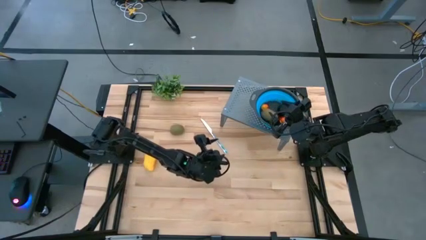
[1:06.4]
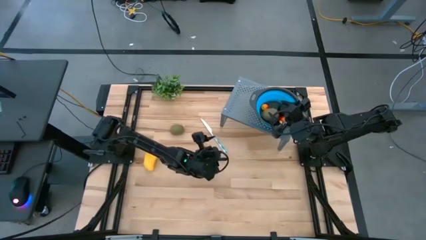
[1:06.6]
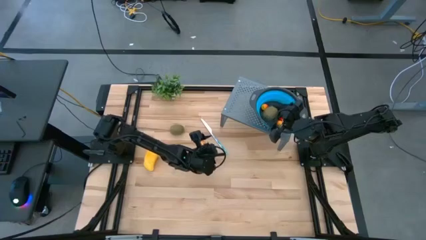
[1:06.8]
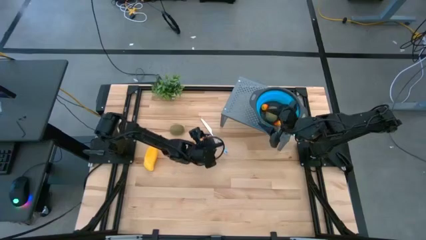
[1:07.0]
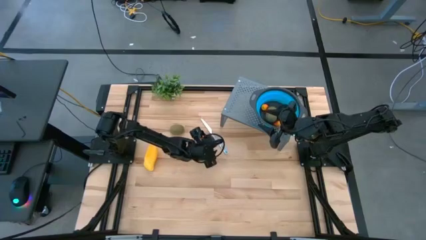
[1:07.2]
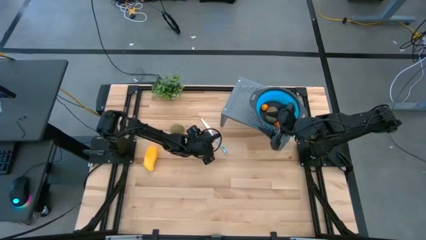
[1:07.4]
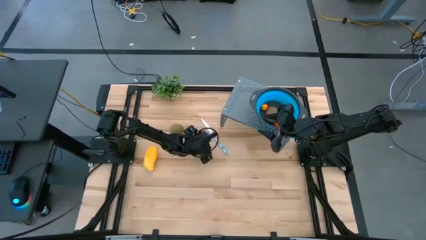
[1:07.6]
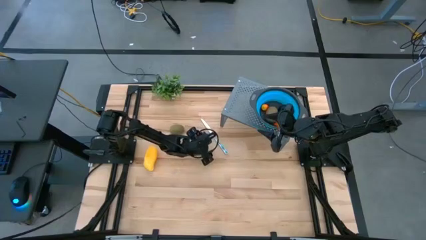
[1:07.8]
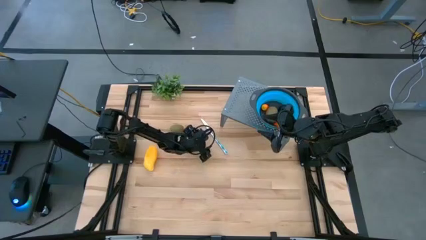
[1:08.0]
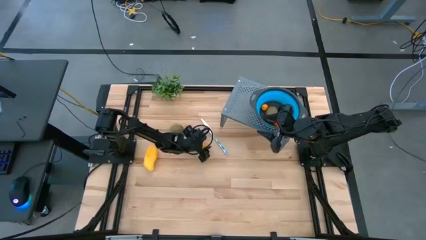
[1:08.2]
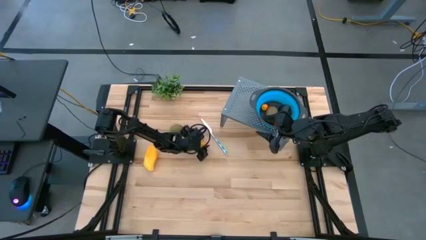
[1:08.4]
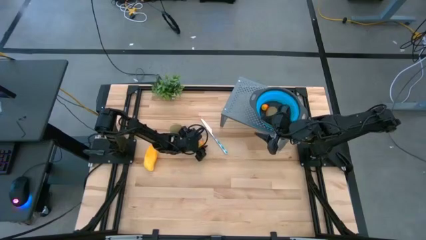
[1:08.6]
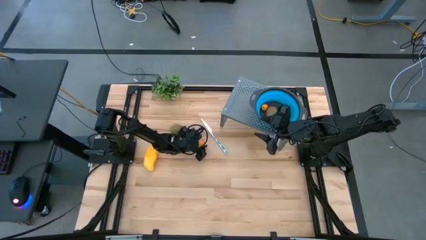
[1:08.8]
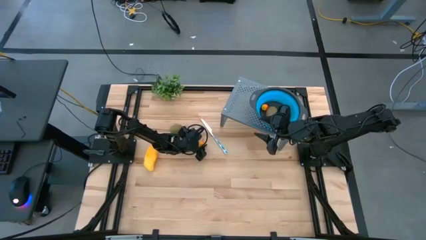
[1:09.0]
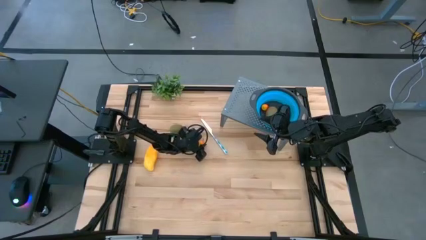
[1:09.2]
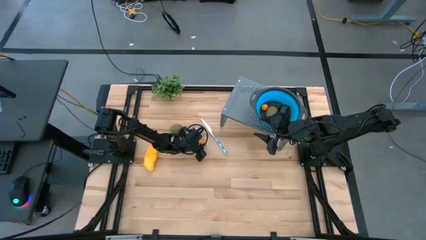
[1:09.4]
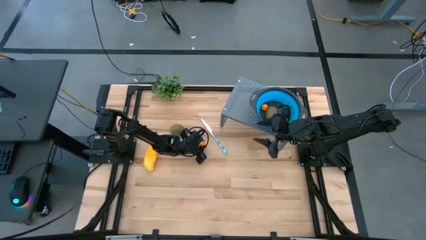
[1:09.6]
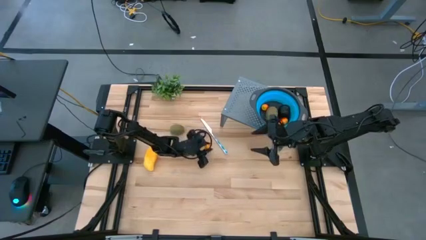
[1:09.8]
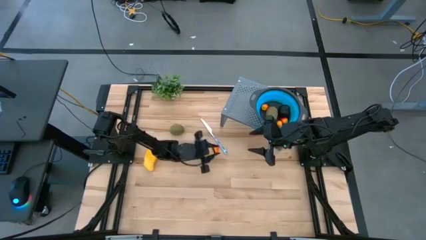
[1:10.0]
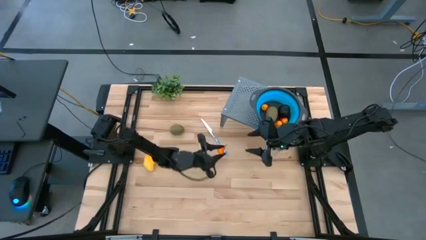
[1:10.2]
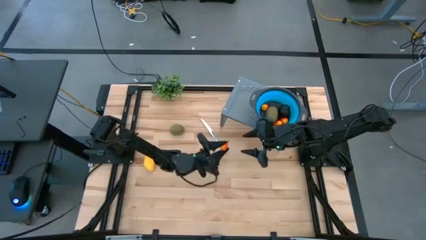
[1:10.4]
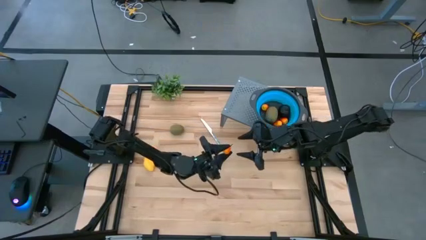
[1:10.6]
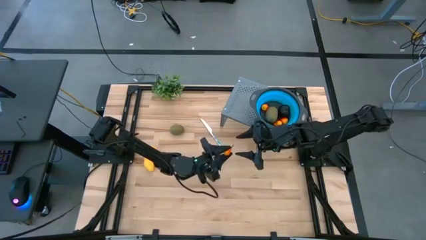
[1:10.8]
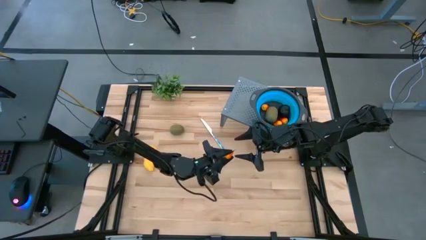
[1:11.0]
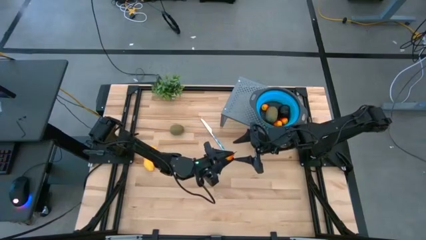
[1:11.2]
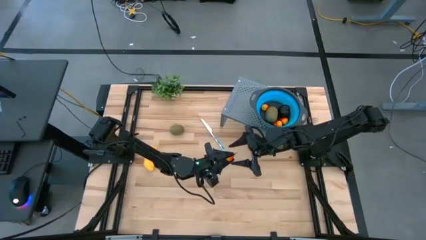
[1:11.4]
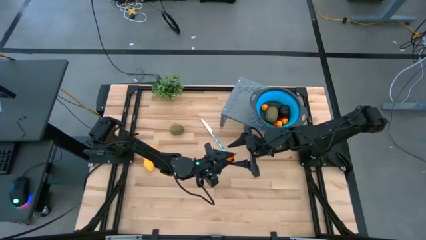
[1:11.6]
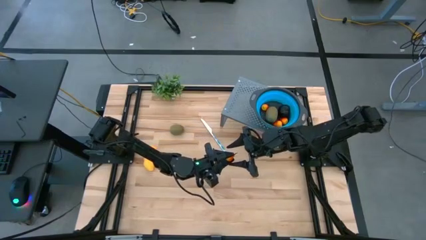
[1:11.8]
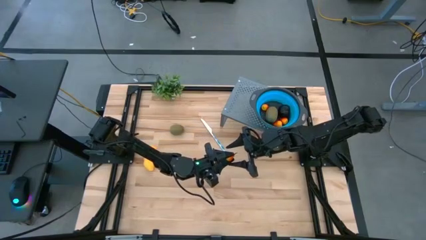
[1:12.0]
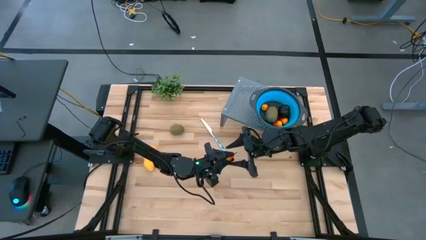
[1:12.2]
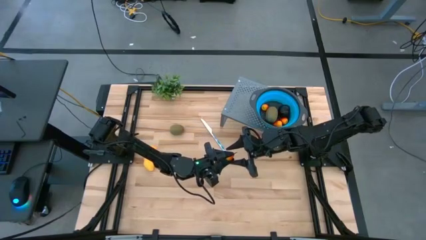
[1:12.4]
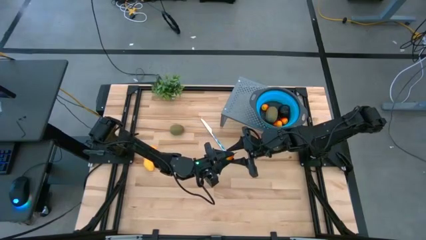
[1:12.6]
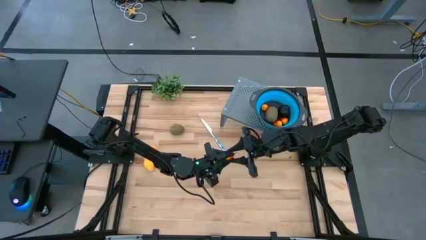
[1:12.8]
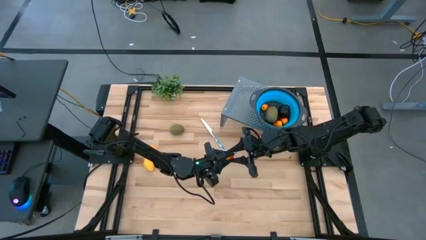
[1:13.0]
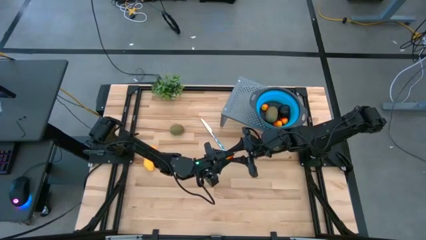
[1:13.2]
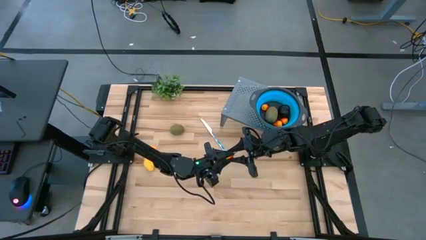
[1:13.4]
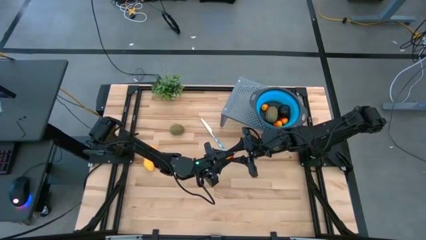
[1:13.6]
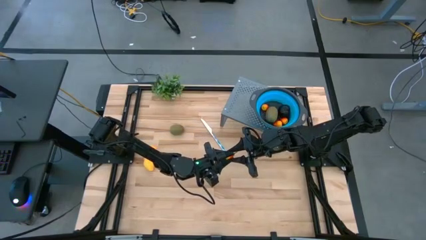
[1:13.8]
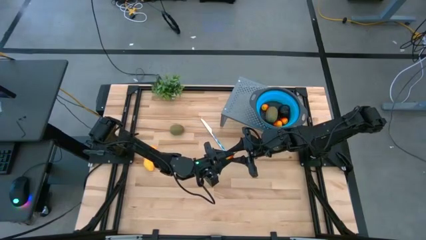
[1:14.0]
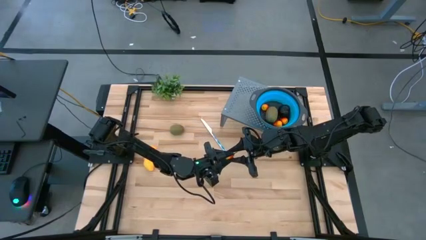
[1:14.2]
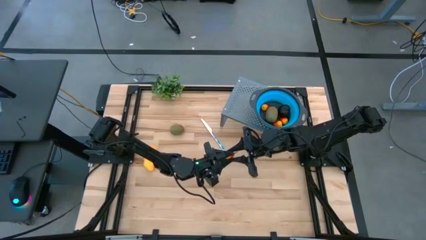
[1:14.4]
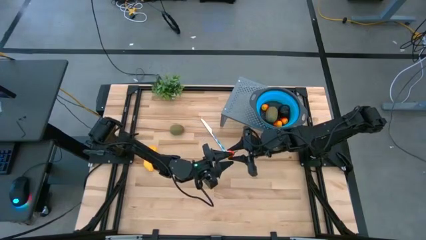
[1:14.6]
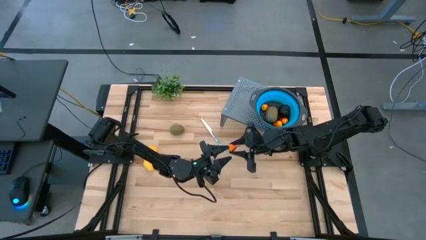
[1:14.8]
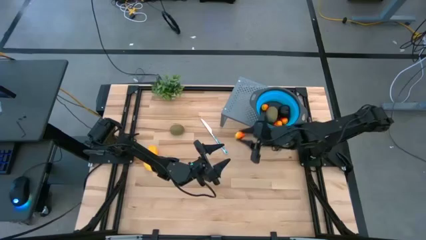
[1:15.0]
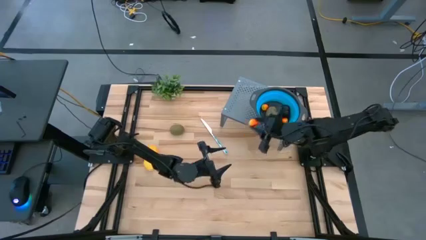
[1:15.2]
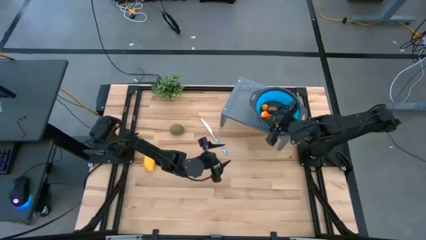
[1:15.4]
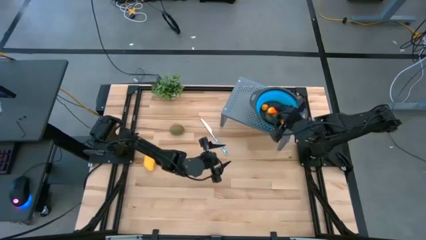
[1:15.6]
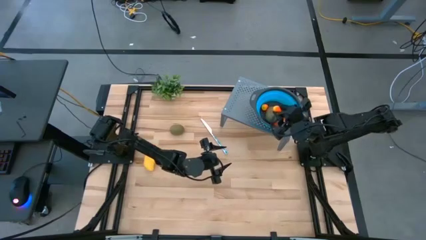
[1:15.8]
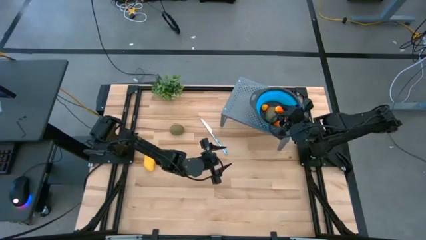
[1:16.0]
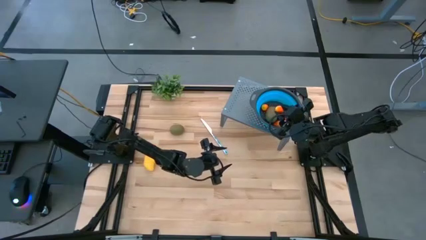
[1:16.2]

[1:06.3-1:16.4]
Task: Pick & Place Fruit
Put the peach into the blue strainer bowl on the shelf

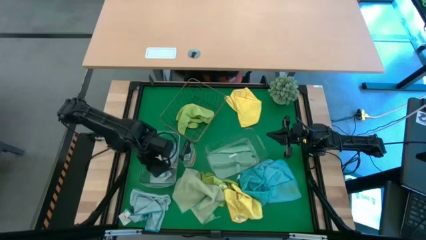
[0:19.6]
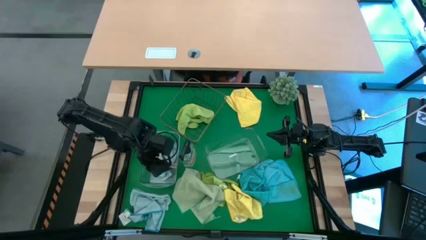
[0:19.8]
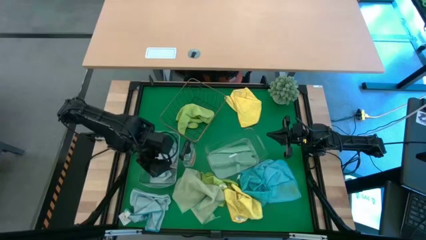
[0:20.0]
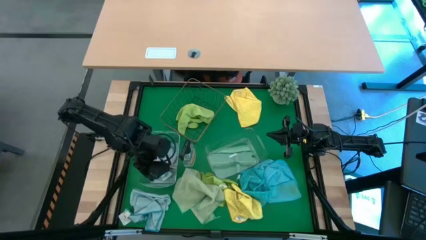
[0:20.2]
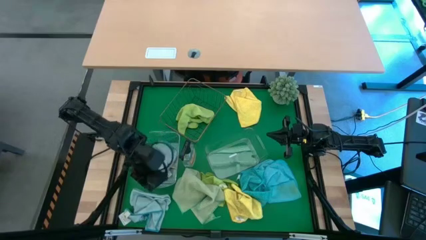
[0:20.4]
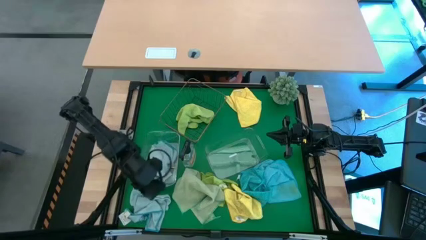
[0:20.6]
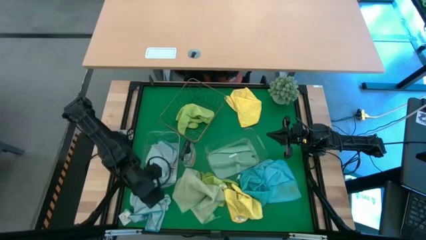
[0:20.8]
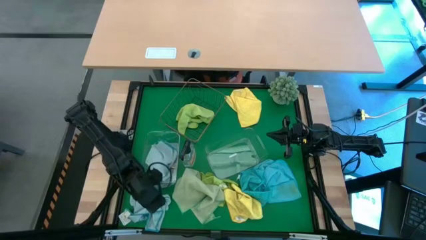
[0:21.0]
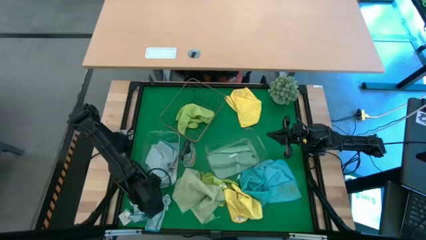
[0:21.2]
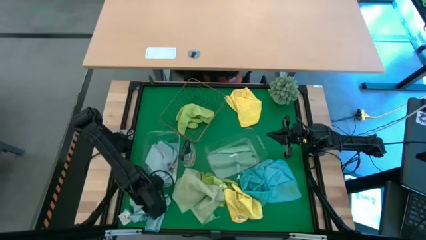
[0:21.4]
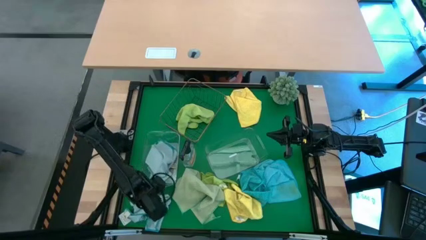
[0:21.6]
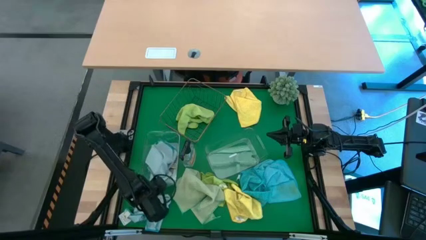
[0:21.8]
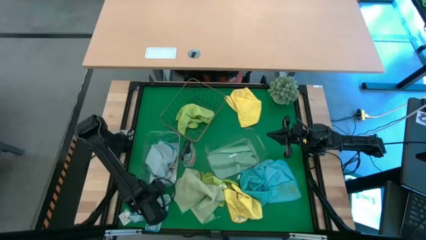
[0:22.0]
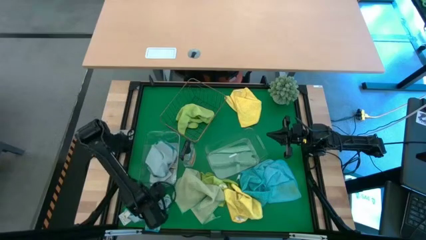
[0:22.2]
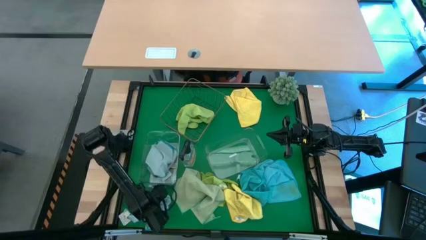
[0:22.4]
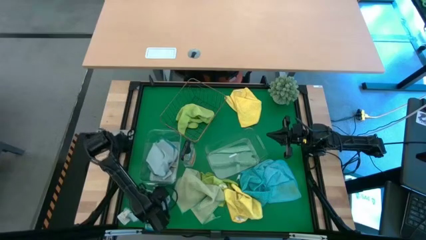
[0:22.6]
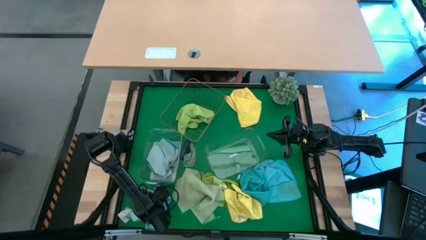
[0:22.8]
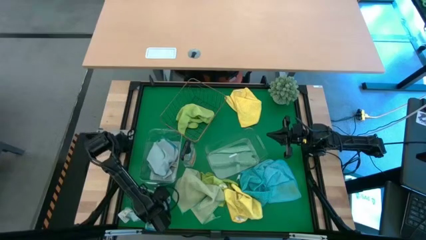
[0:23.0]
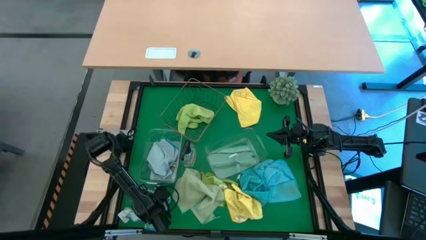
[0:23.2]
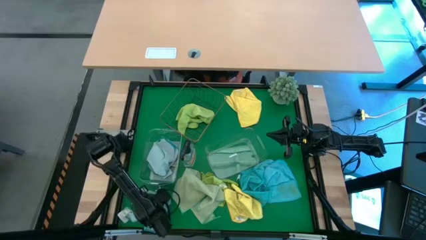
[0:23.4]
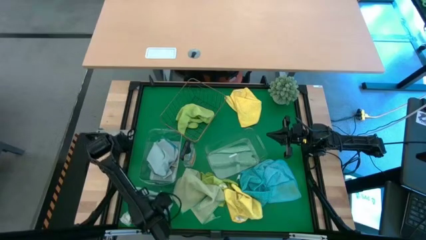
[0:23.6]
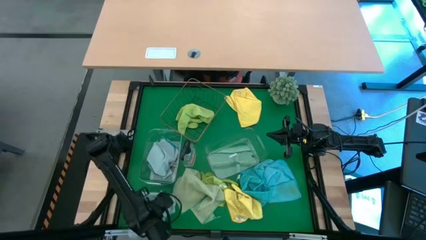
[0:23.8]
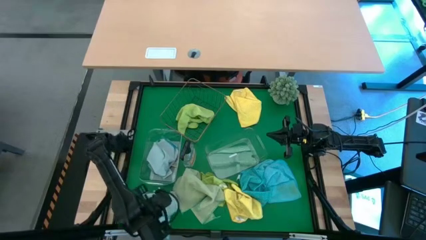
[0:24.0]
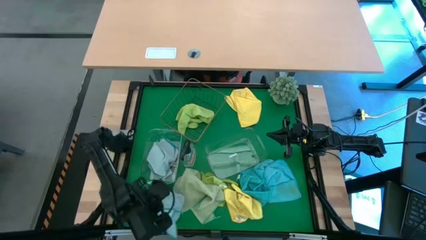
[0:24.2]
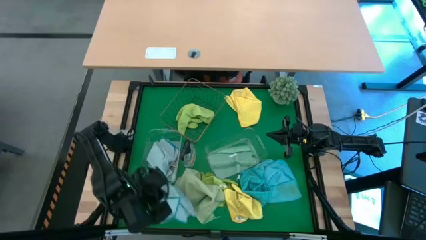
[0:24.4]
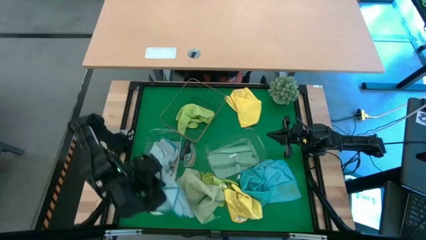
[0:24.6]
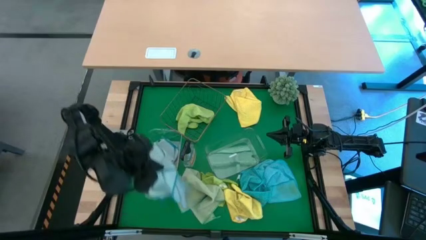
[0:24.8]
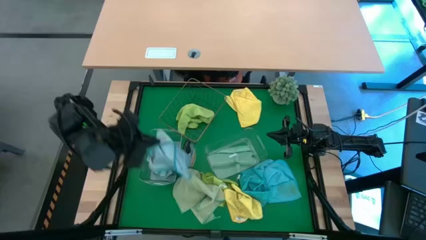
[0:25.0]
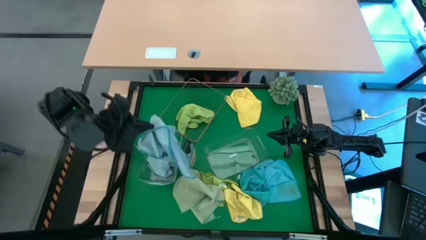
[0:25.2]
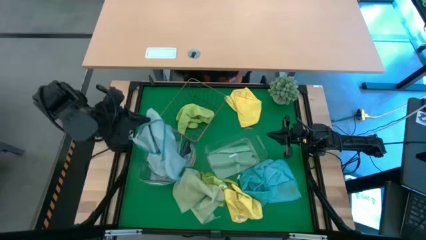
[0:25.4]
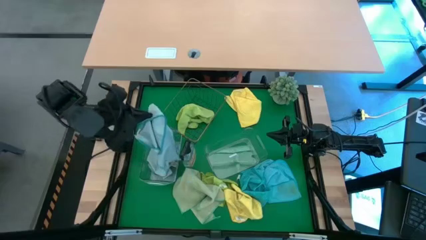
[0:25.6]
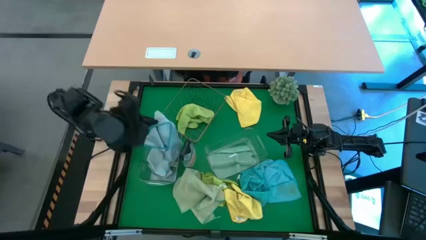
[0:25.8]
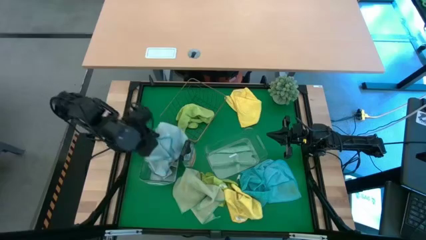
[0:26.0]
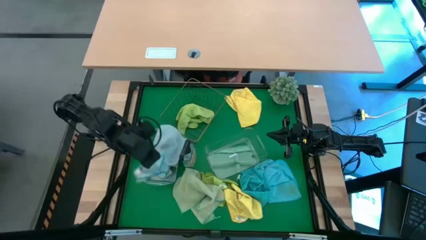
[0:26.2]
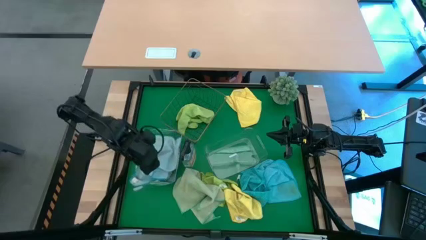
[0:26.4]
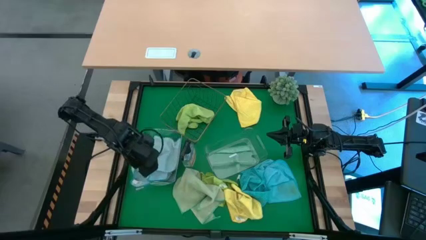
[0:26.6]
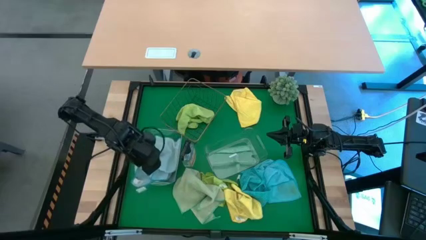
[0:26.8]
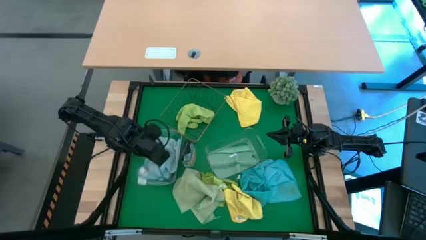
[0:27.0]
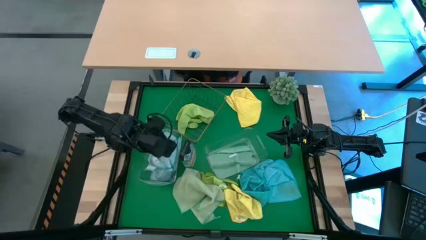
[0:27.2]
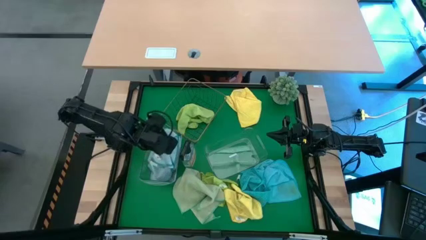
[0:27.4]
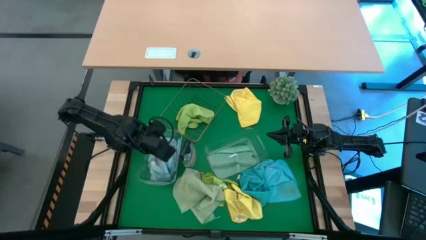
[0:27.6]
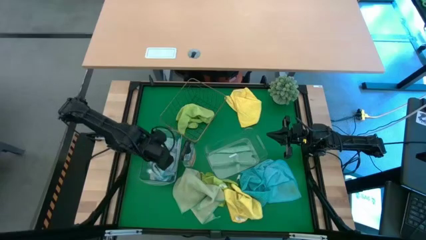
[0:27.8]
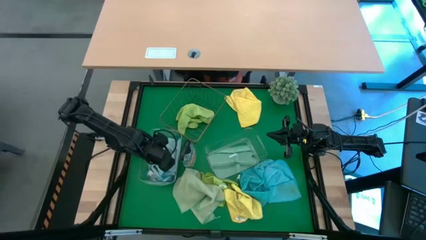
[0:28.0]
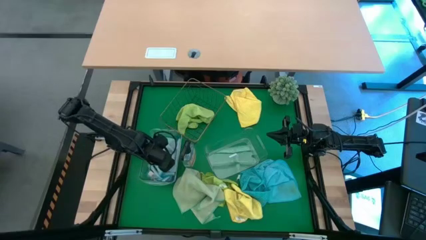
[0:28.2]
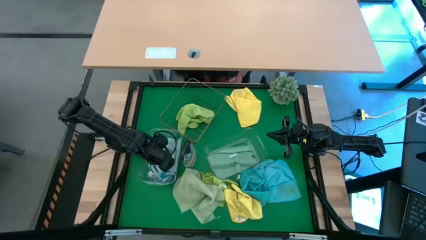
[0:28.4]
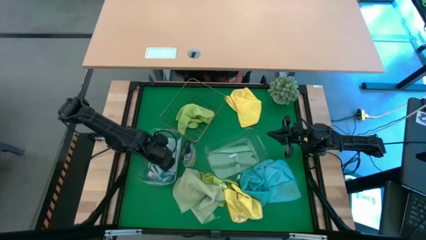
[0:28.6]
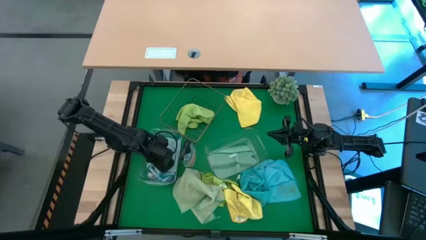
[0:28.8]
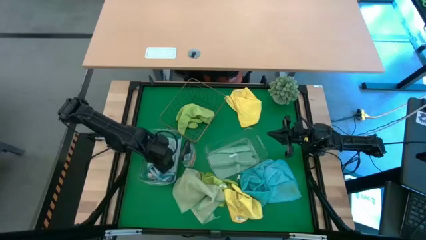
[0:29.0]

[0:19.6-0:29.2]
Task: Sort microfiber towel by color & place in baskets
Put the blue microfiber towel into the left transparent bin
